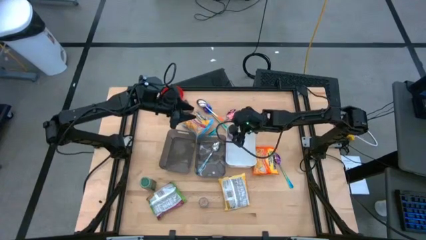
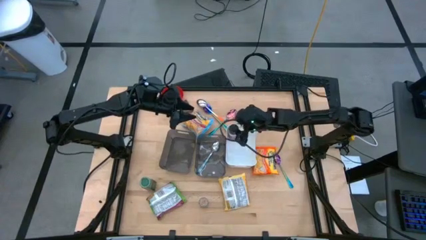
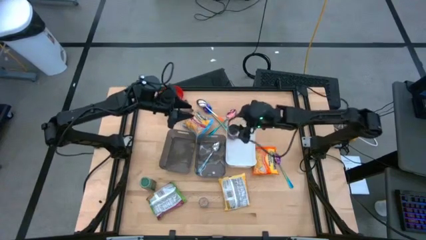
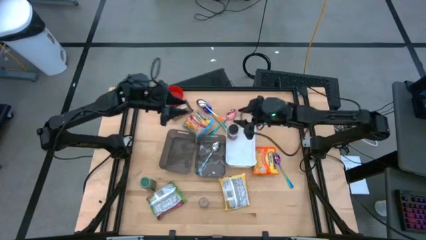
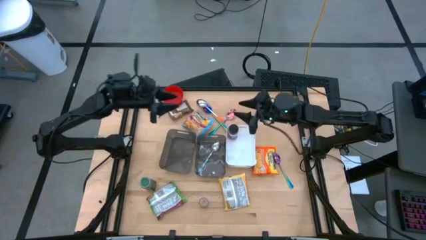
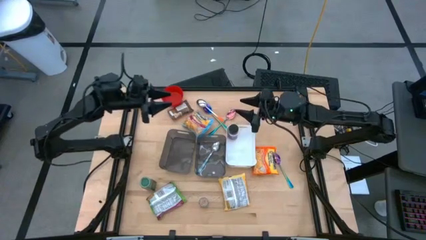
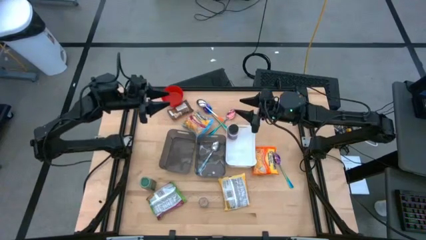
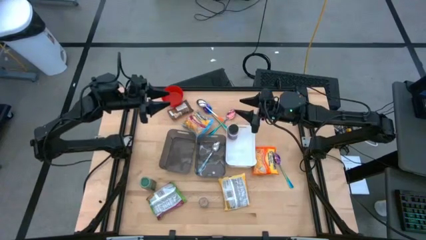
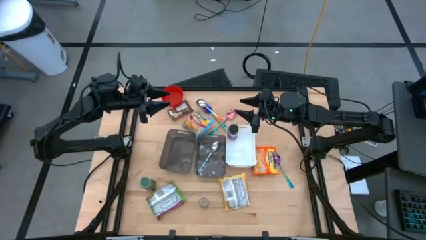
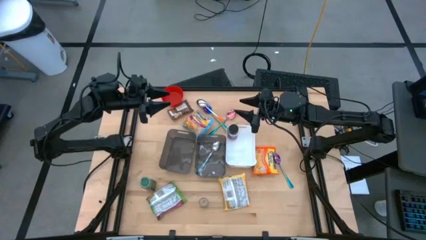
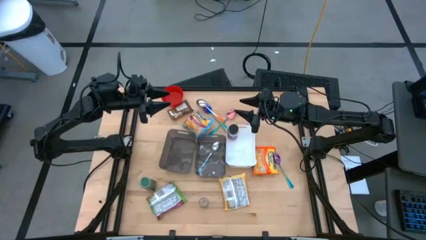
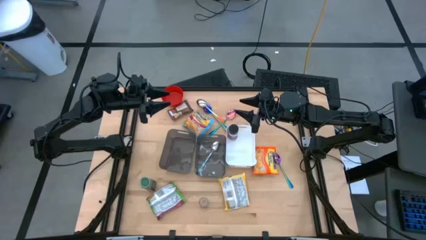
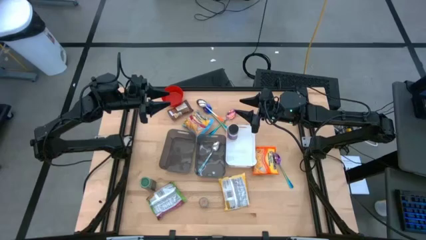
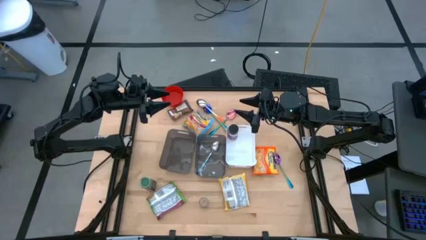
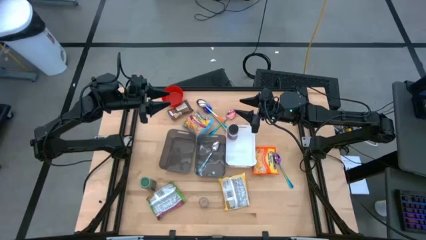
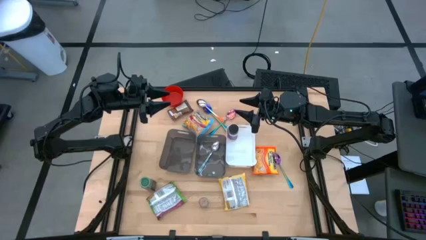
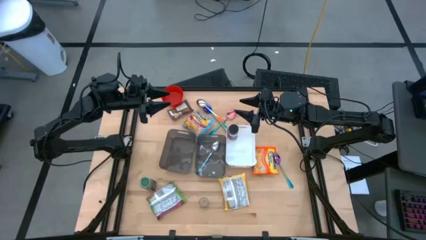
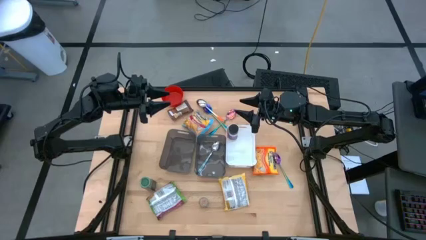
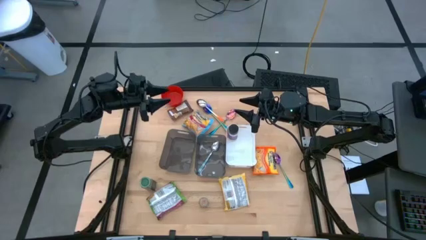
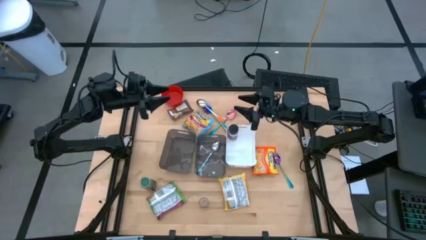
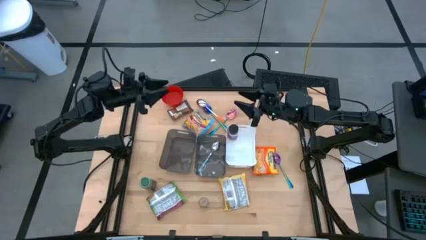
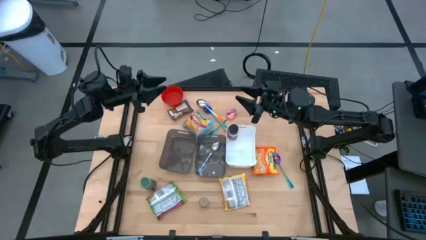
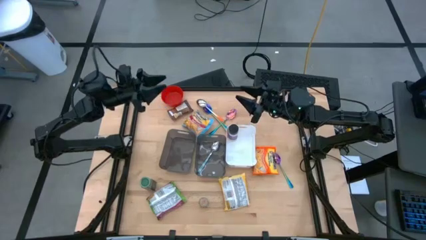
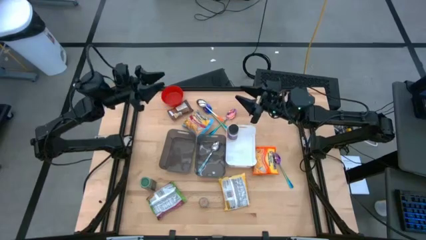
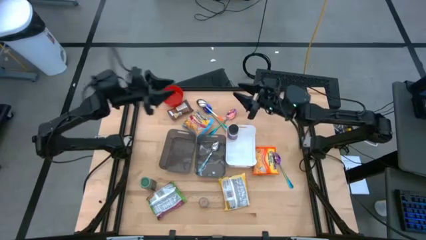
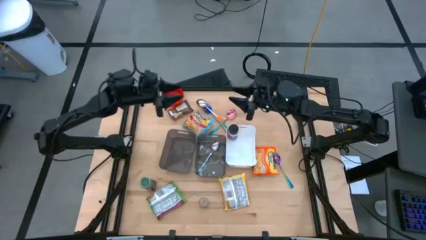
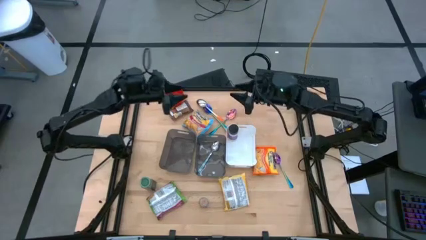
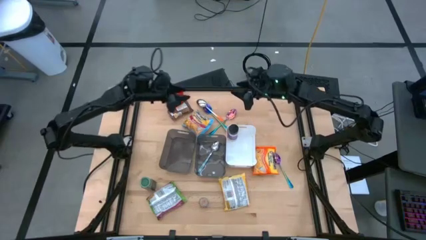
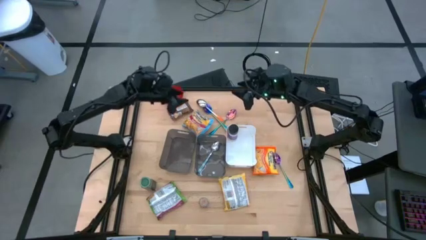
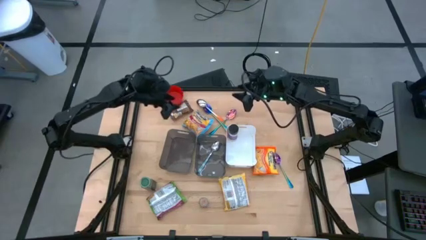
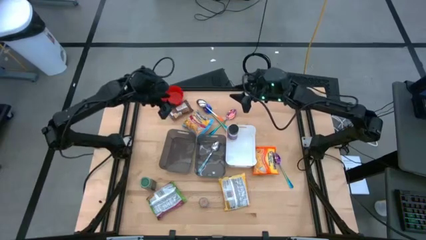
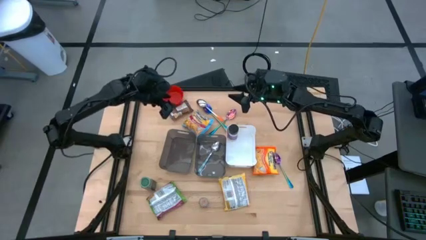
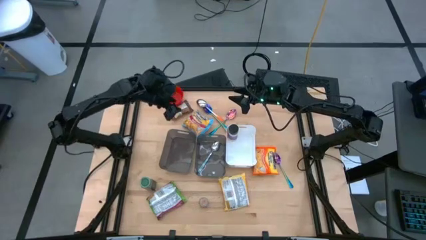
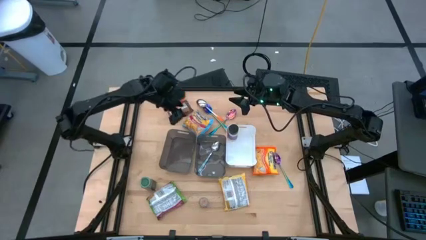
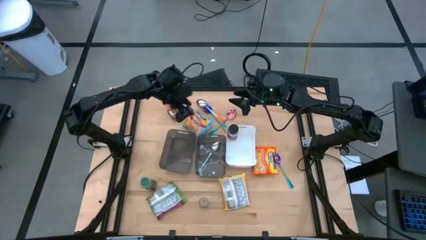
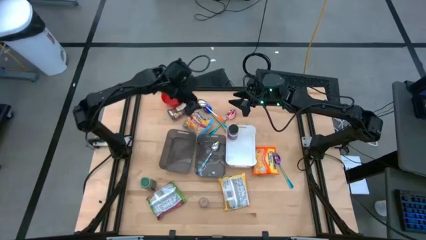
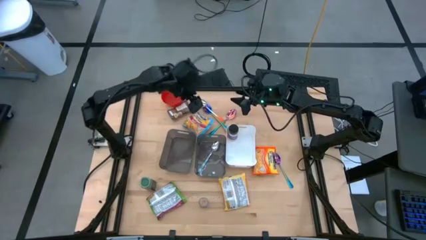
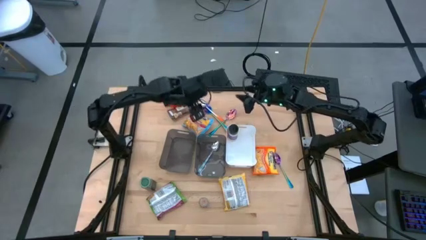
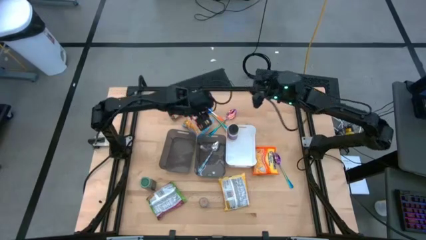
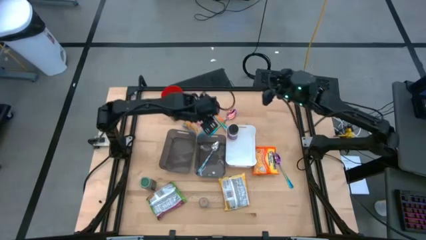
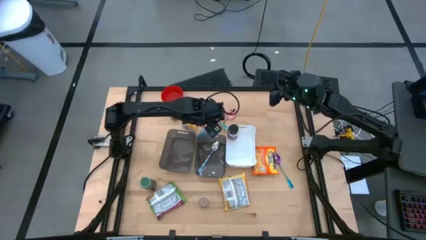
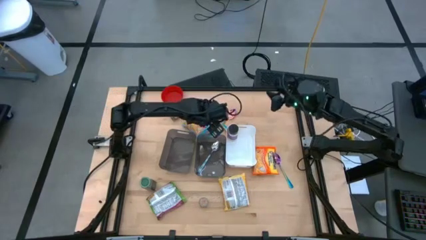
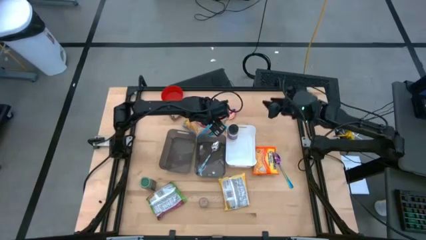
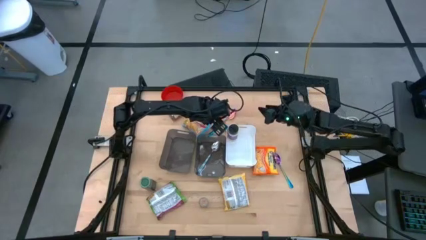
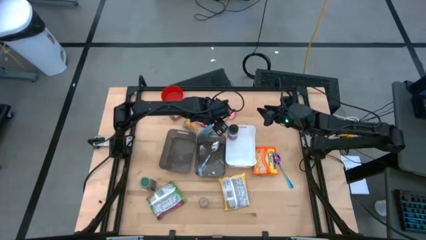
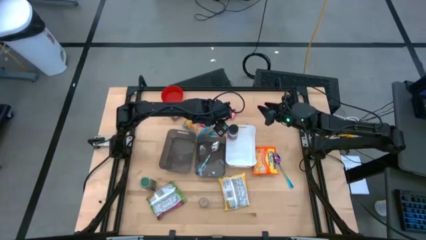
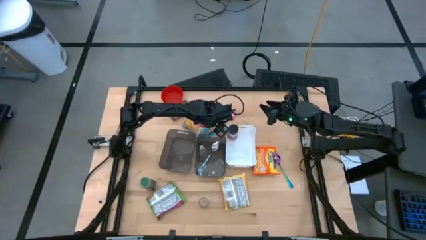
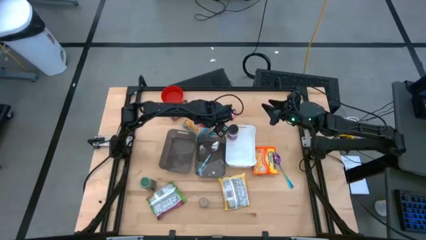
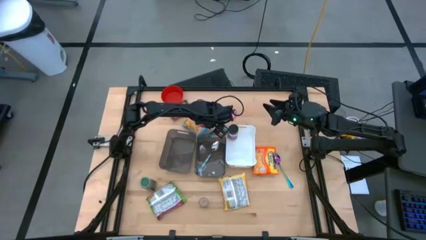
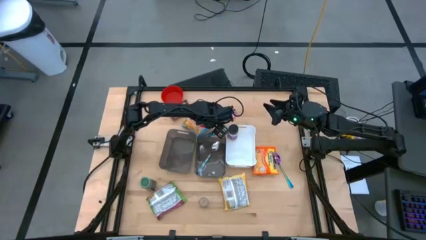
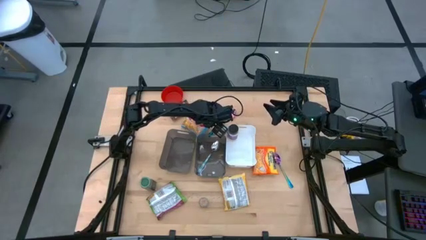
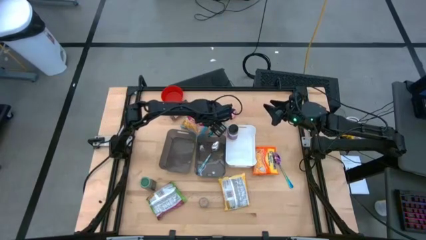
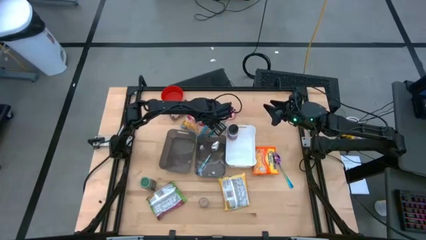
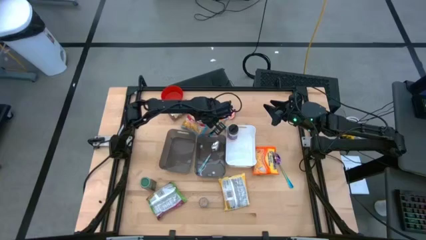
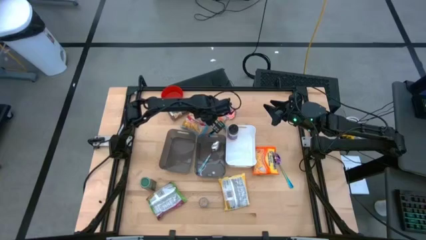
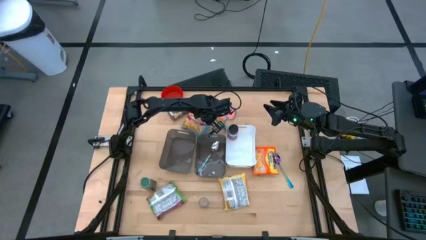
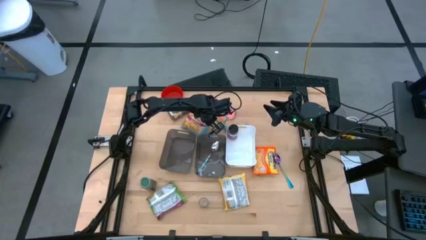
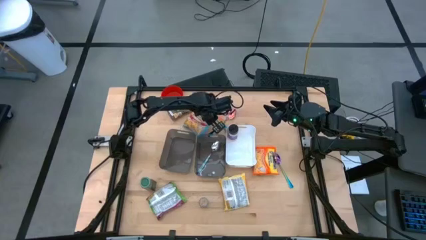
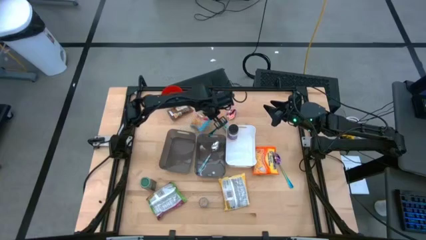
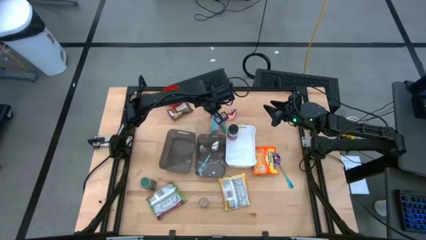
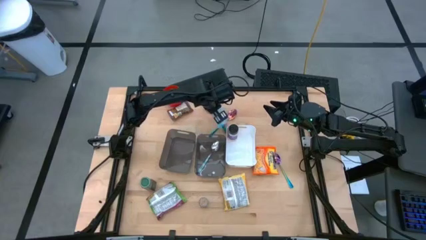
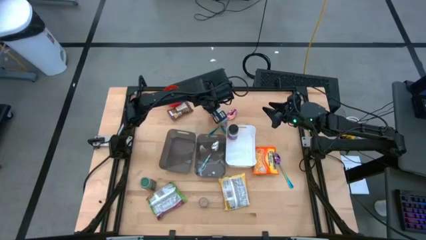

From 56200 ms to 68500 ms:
Task: Pick & Place Food Item
Put the blue pack into the left gray bin

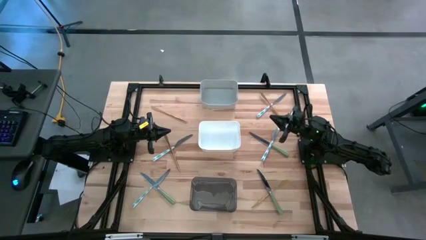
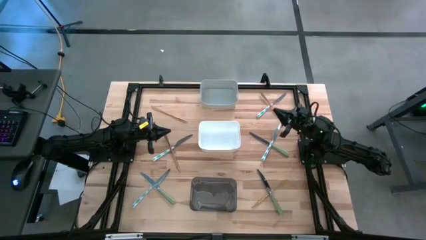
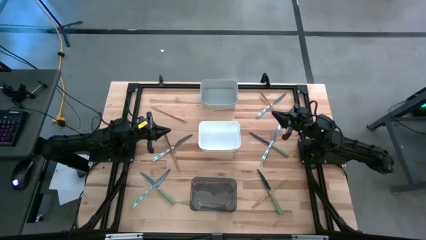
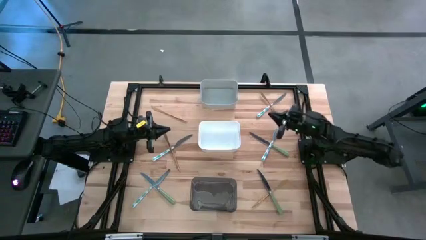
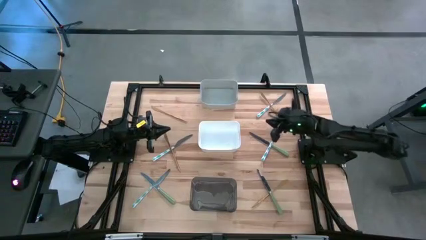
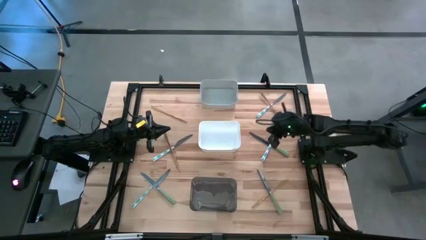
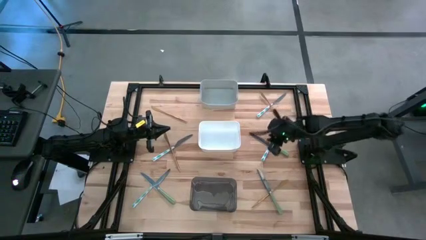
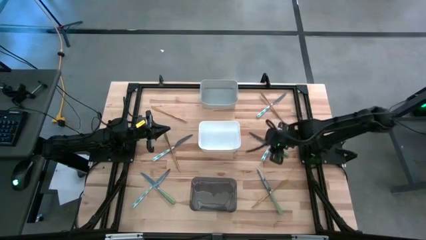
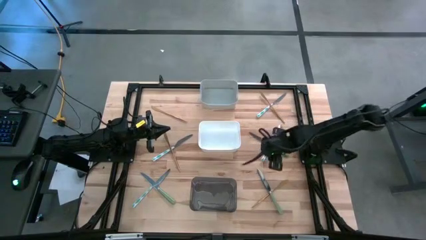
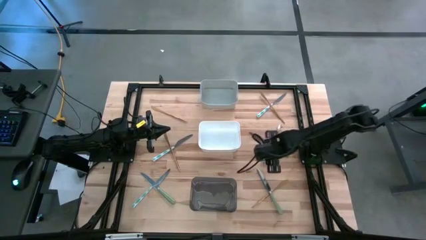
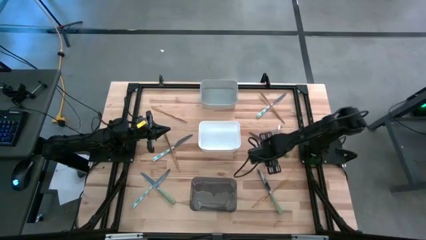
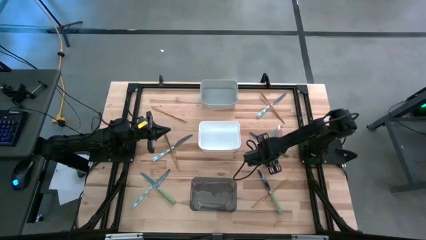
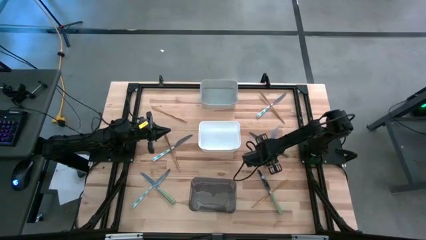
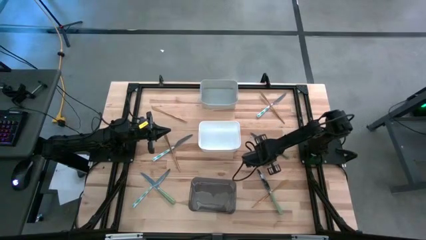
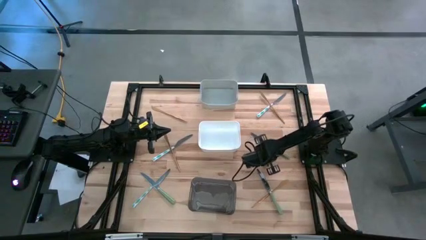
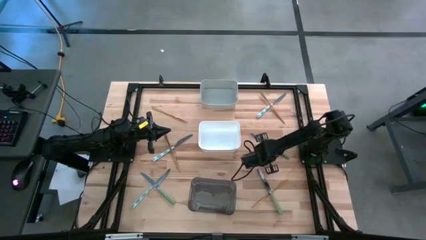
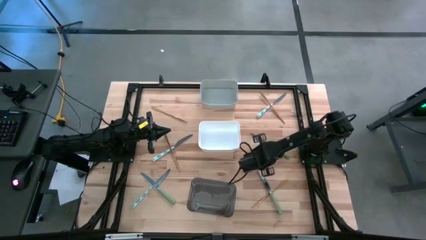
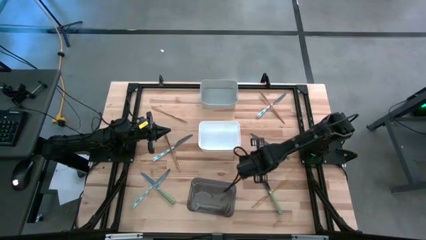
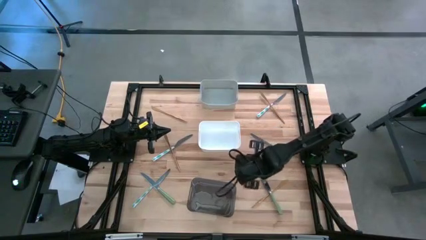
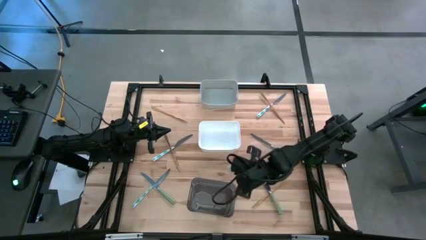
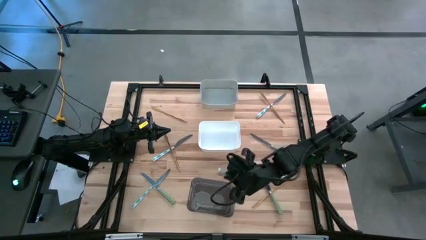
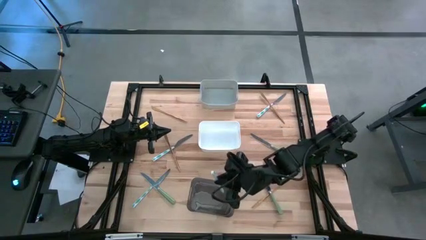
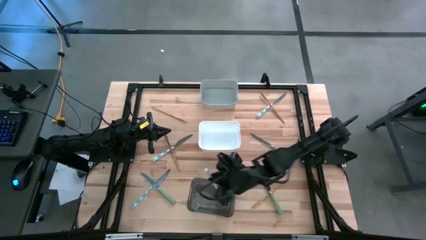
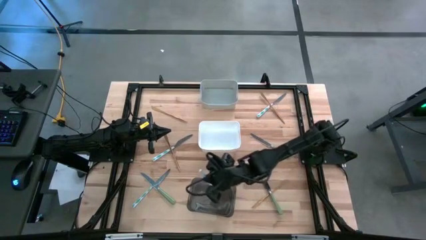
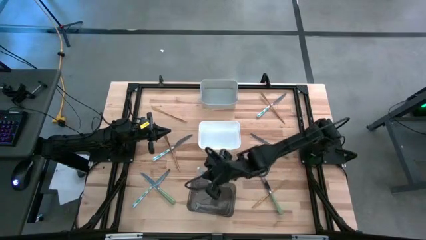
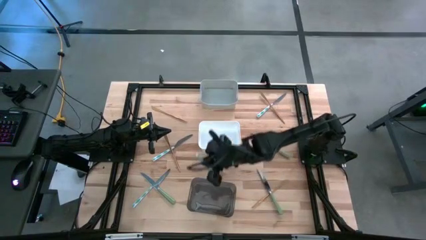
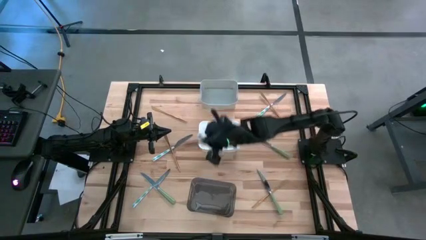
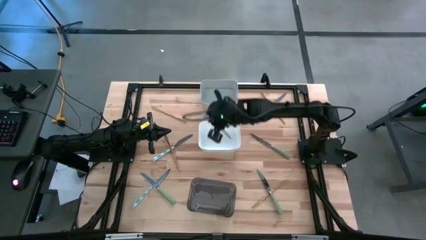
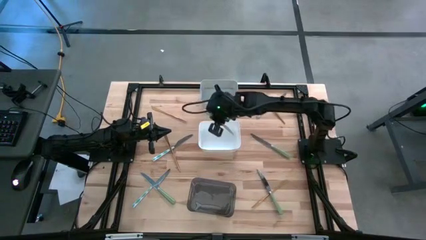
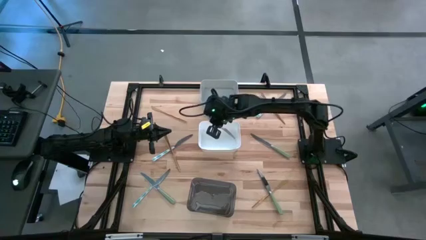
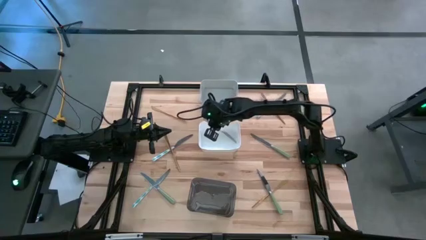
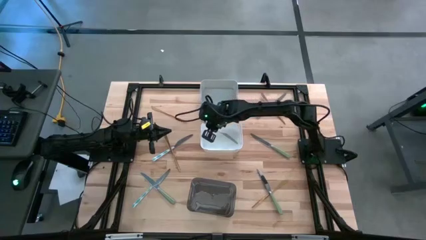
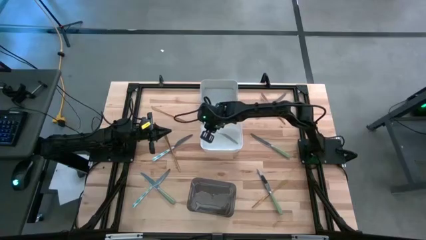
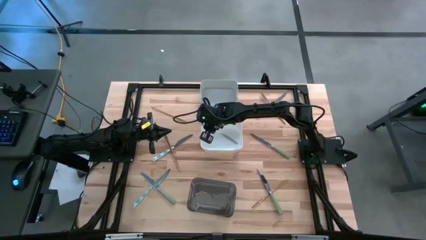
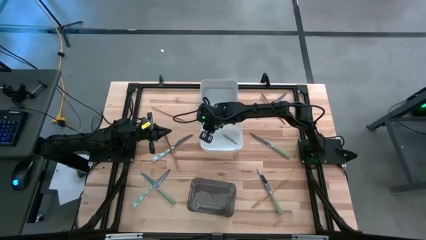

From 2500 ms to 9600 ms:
Task: Sort silverware by color (type)
Put the white-blue table knife into the white bin
